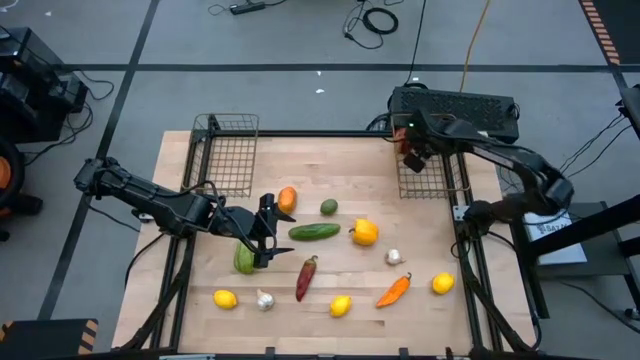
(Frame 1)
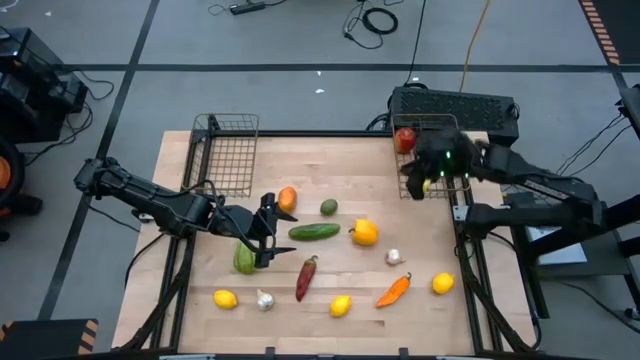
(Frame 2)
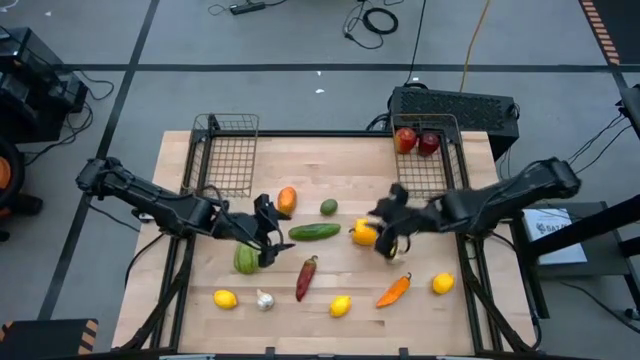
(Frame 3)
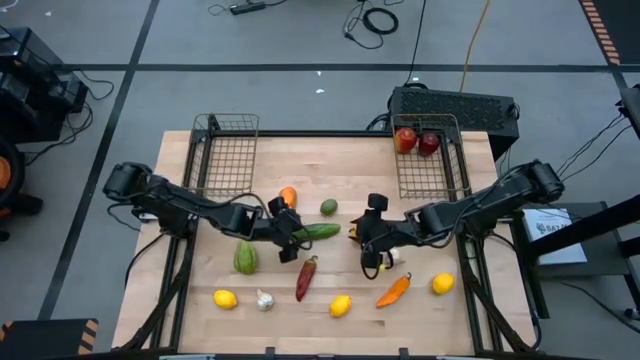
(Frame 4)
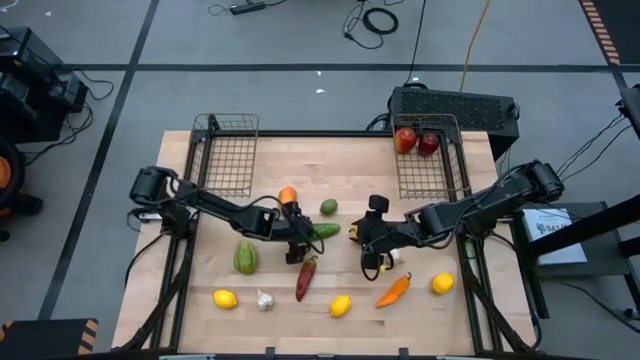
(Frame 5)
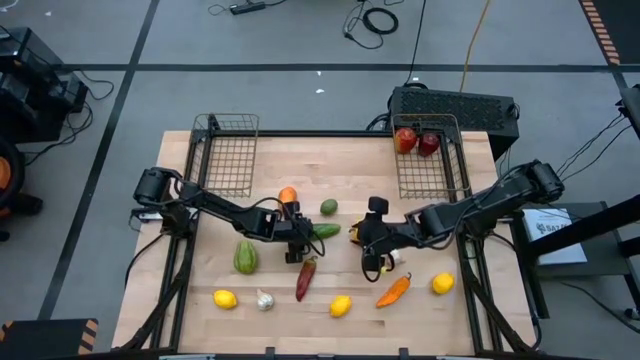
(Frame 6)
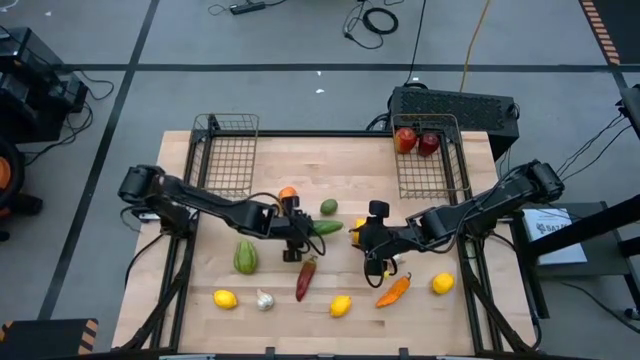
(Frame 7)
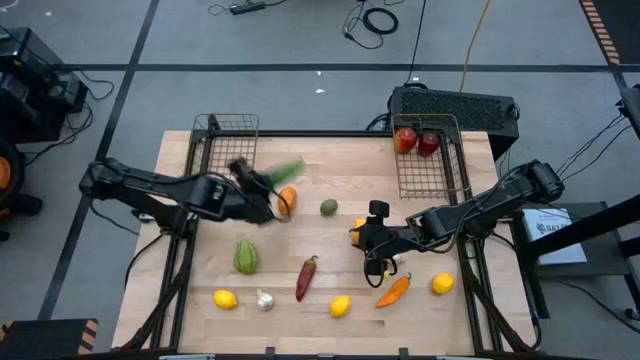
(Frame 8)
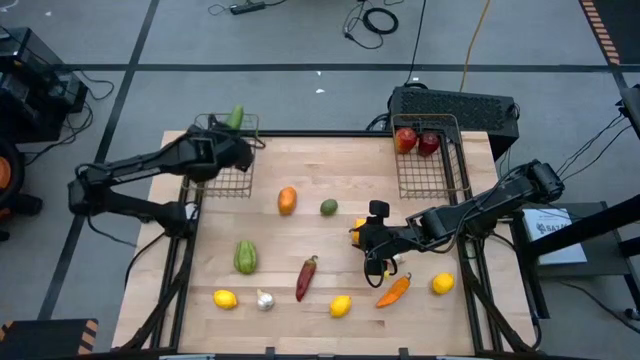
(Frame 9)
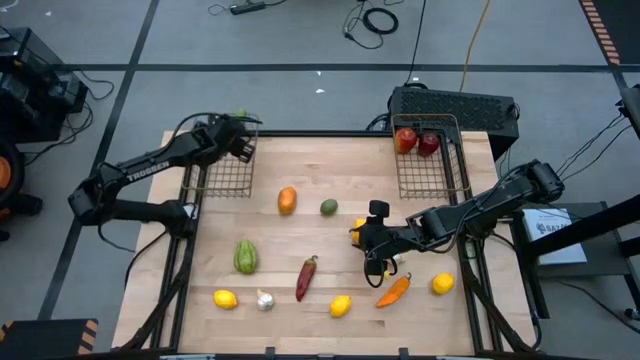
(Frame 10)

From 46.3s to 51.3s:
Task: Sort produce into baskets
Put the green cucumber into the left wire basket

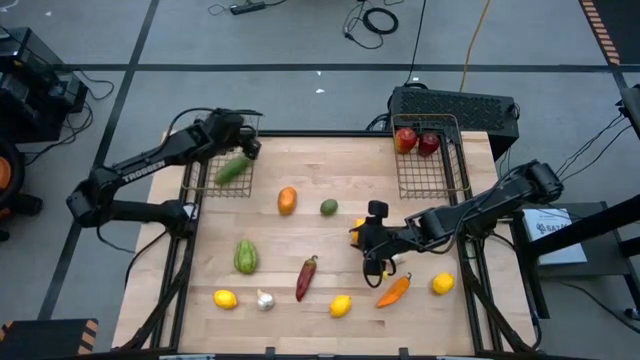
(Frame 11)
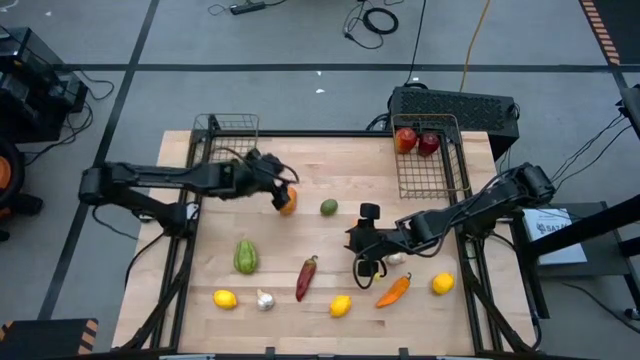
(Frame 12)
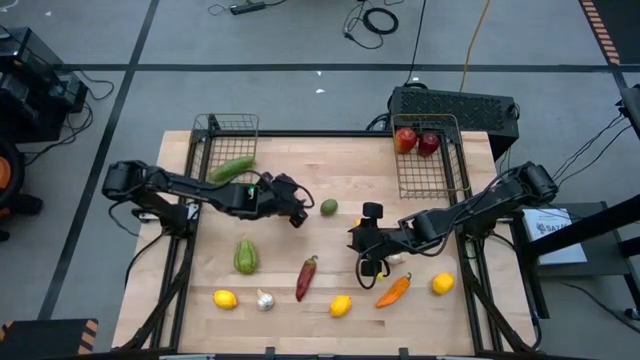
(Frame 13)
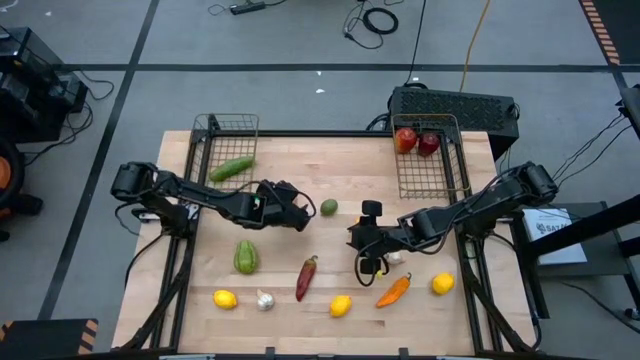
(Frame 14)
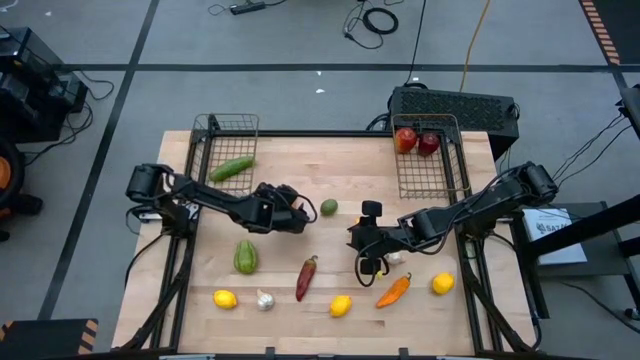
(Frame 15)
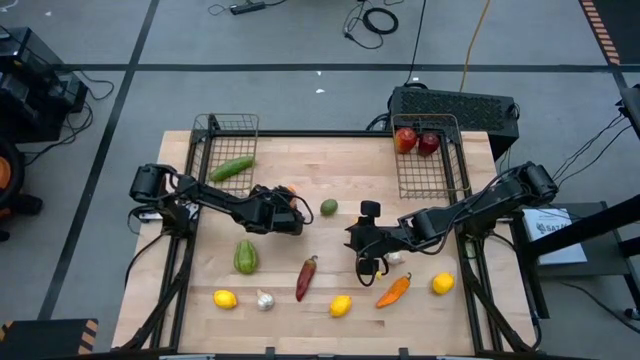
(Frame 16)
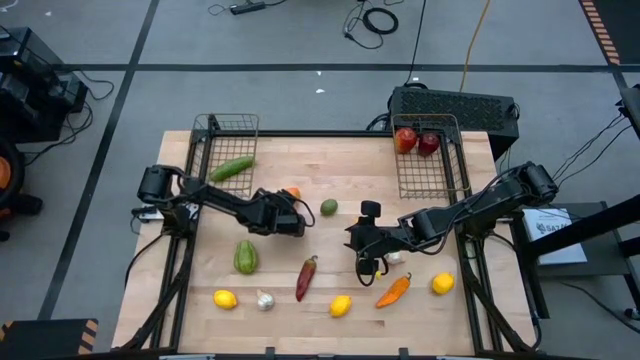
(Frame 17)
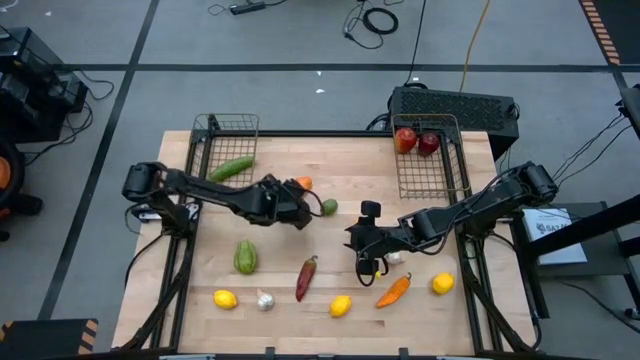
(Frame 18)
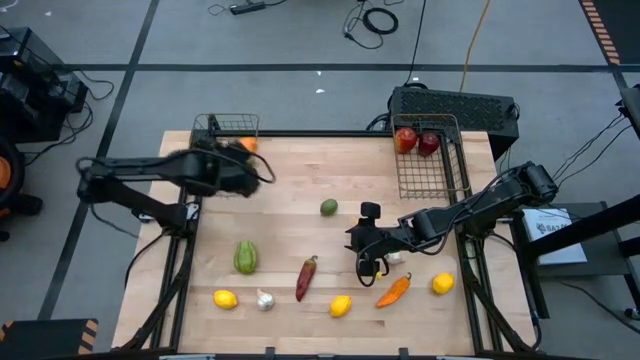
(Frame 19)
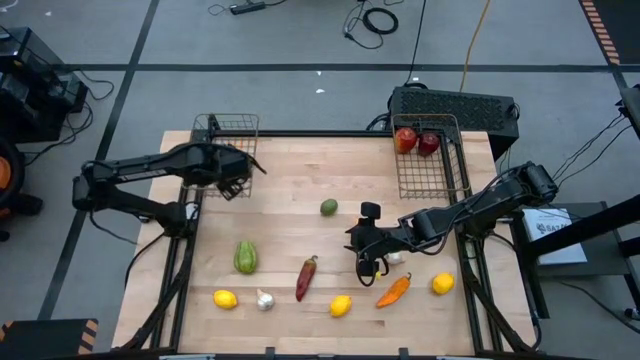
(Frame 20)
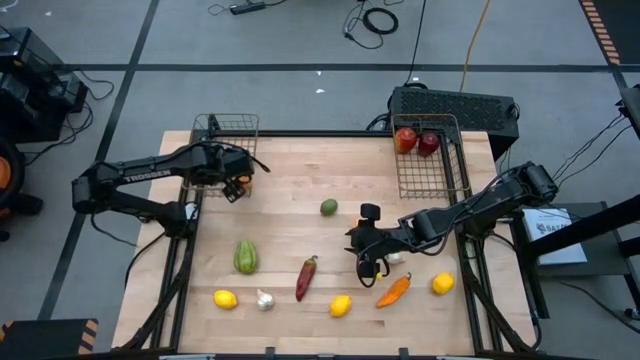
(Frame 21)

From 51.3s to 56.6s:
Put the orange papaya into the left wire basket

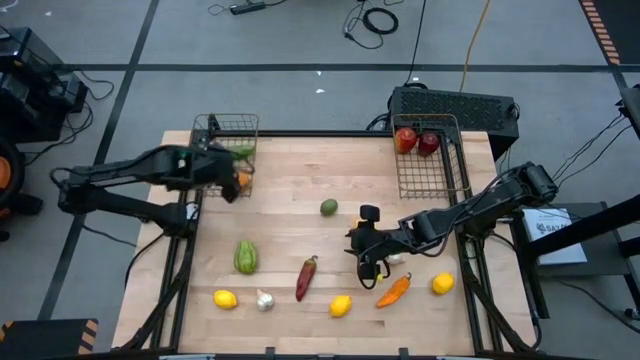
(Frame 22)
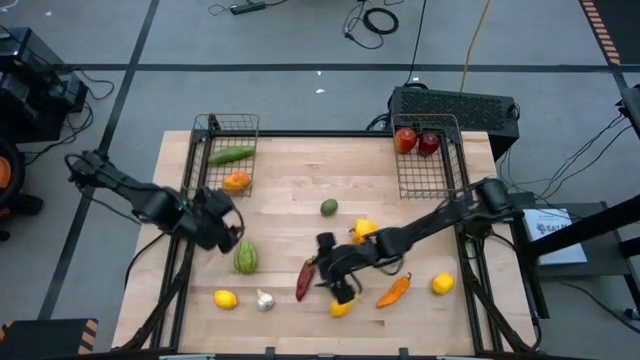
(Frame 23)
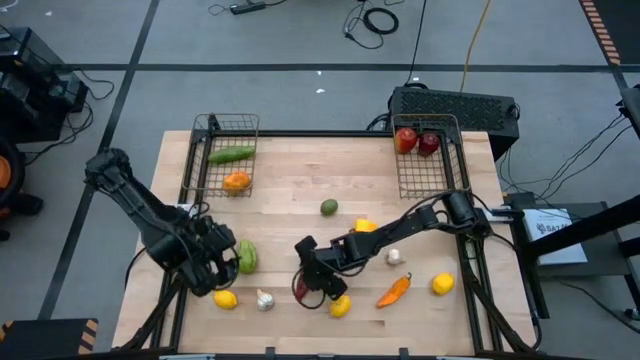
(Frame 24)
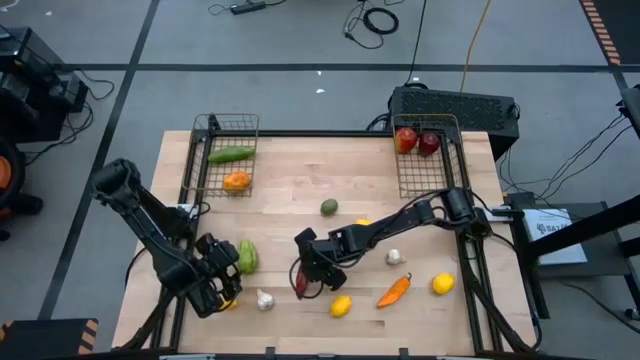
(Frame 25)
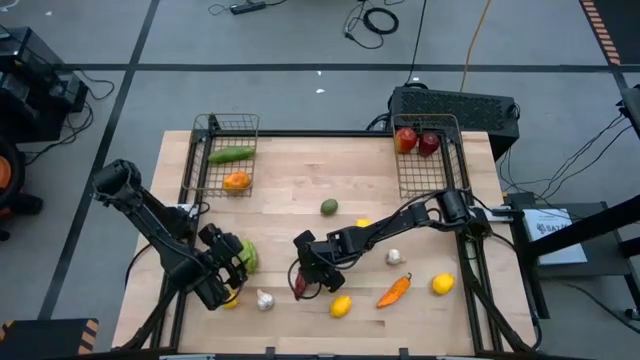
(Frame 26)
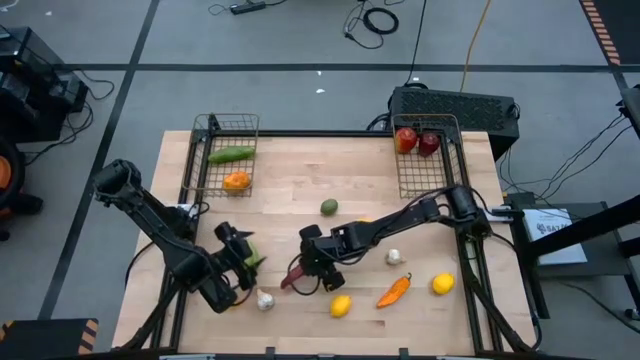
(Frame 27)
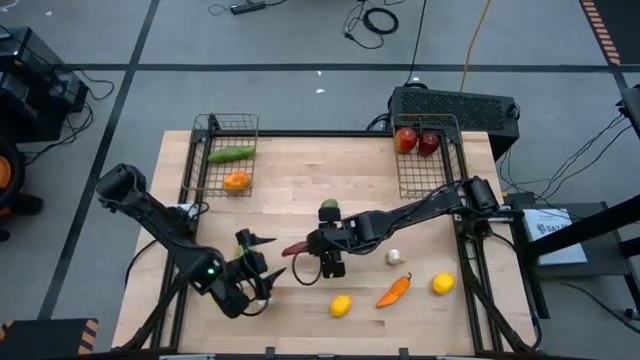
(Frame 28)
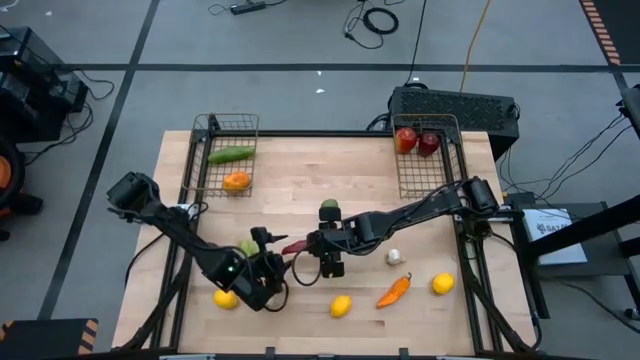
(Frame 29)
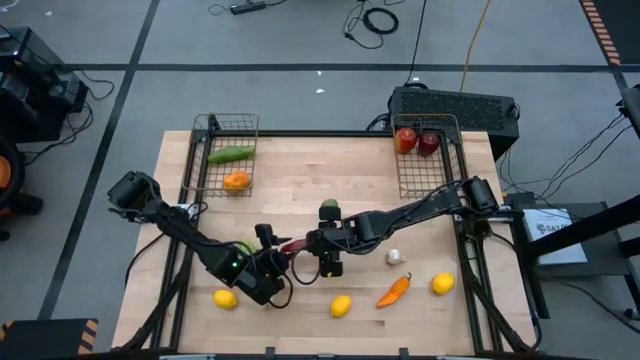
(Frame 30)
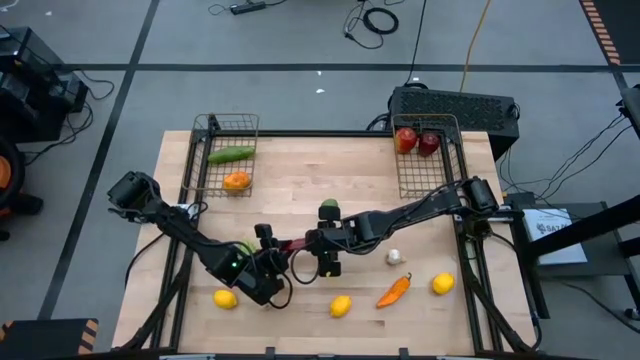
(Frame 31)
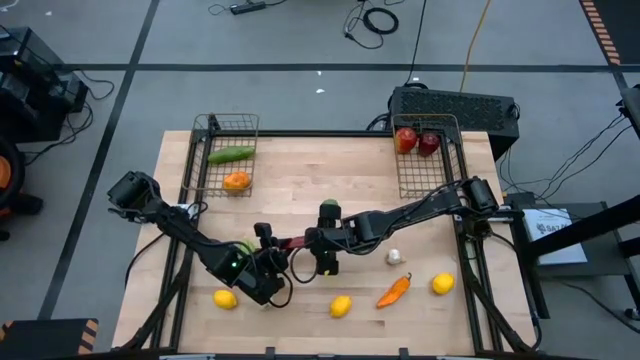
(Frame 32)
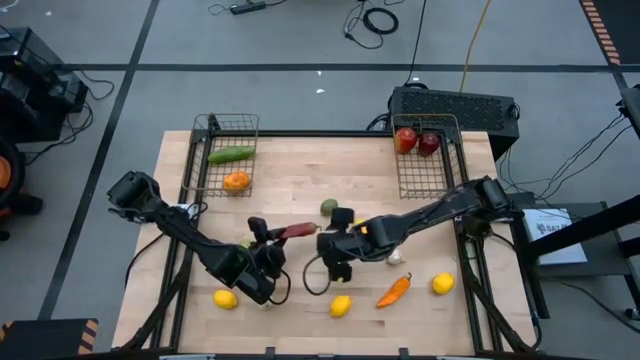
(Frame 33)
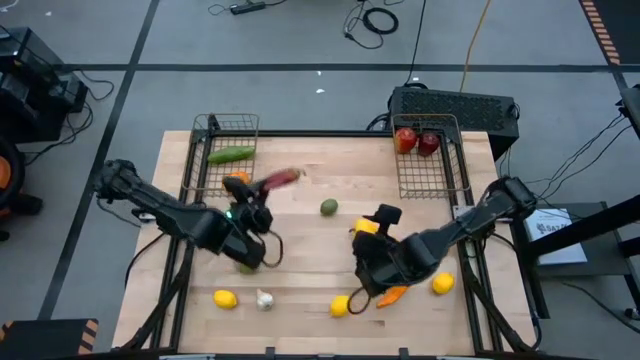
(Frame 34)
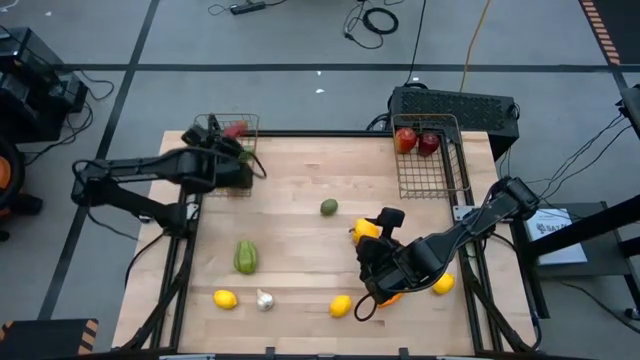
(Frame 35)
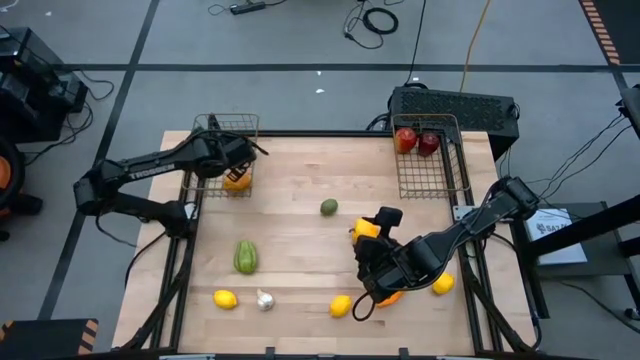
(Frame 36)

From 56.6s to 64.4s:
Put the red chili pepper into the left wire basket

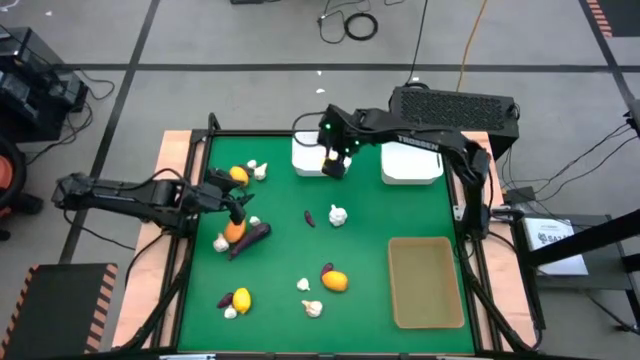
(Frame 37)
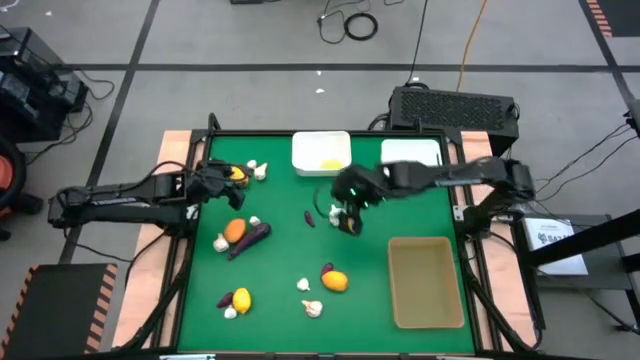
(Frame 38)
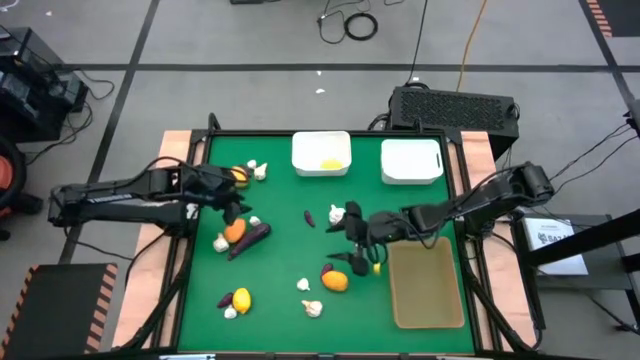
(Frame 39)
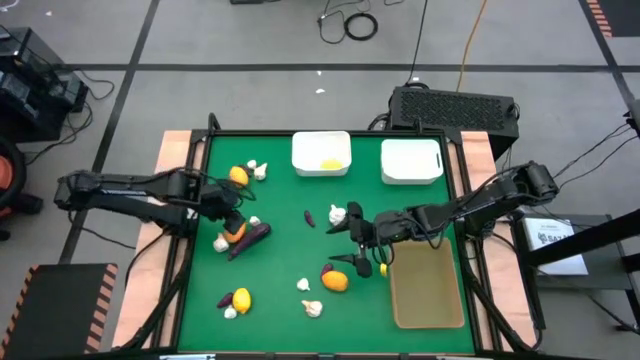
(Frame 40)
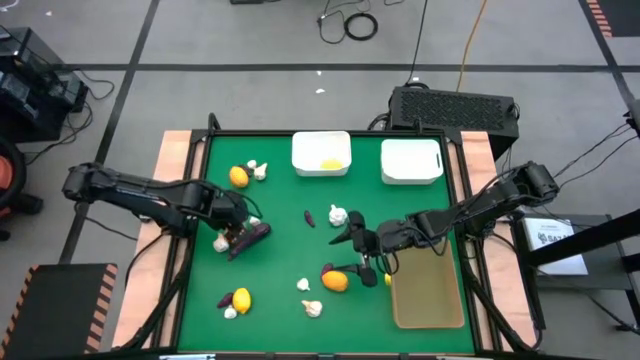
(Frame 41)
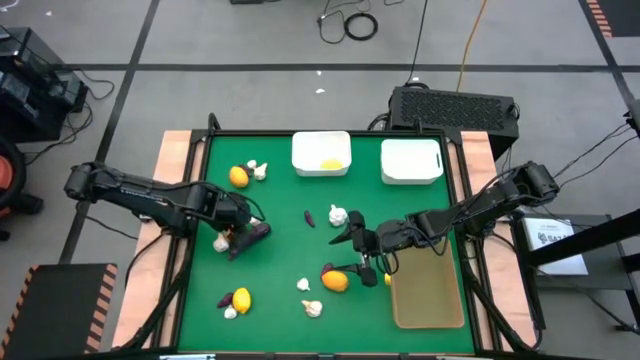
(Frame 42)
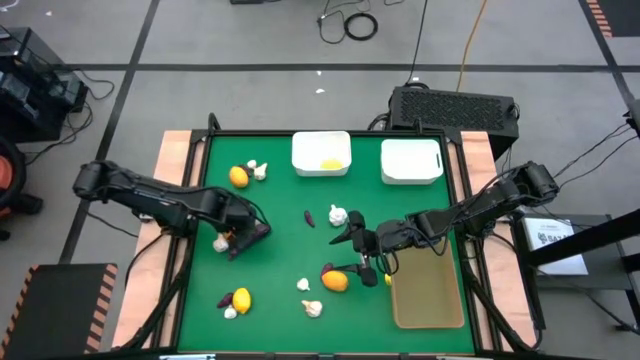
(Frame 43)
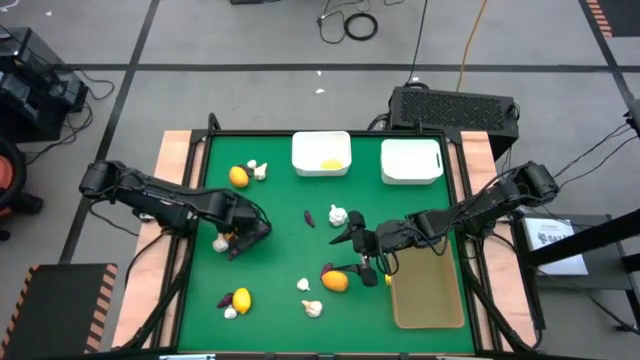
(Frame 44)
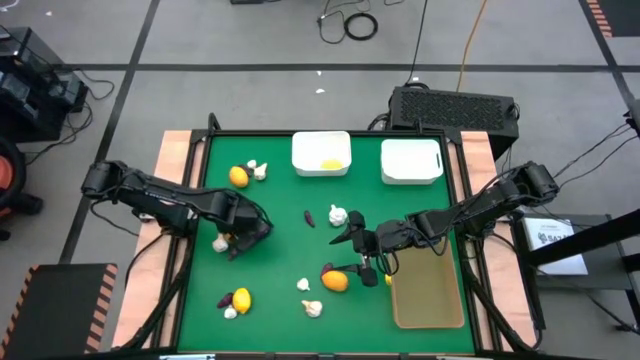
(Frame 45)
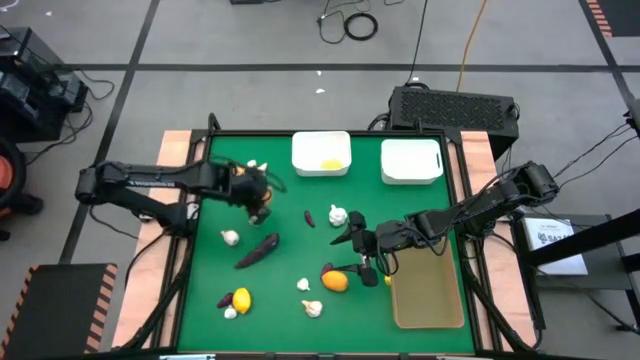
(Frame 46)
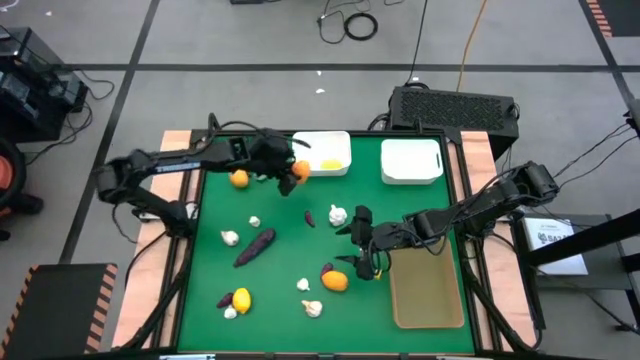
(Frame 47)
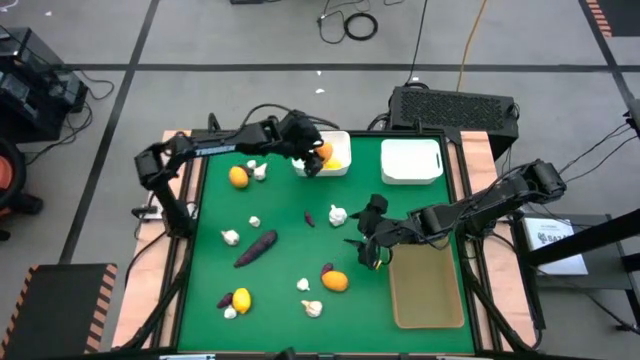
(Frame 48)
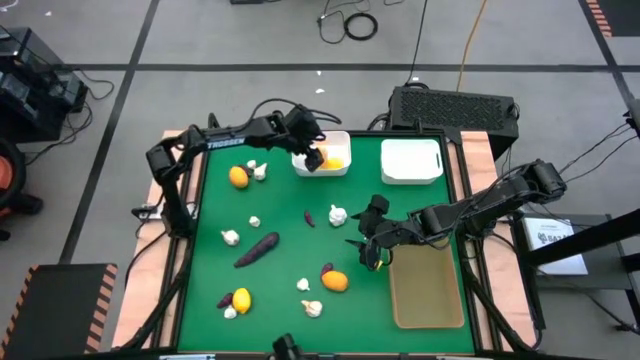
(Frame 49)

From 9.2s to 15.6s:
Task: Sort produce into baskets
Put the lemon into the left white bin
